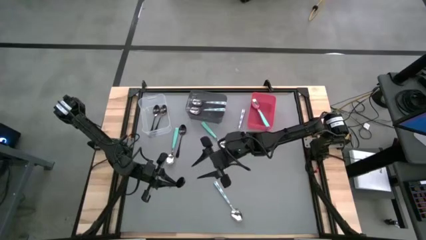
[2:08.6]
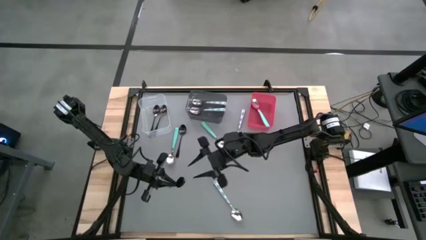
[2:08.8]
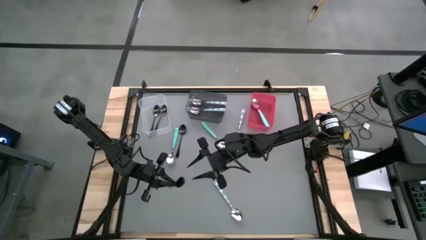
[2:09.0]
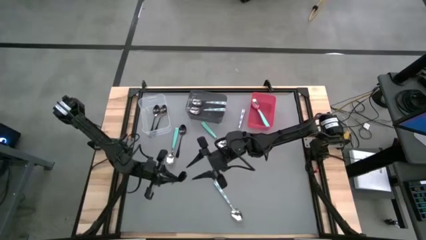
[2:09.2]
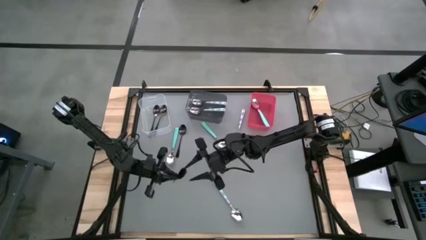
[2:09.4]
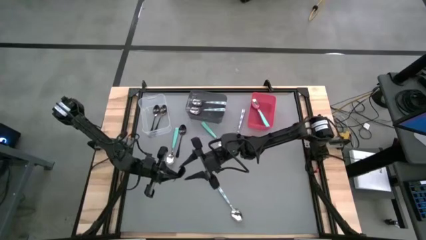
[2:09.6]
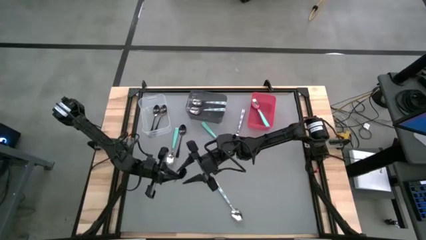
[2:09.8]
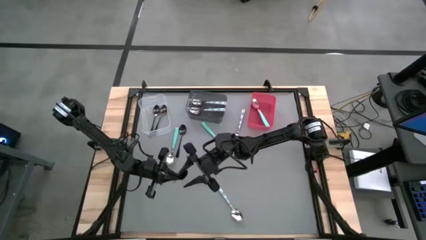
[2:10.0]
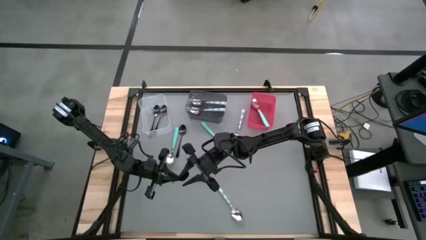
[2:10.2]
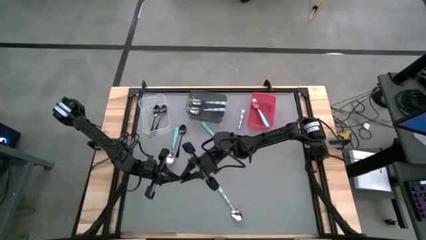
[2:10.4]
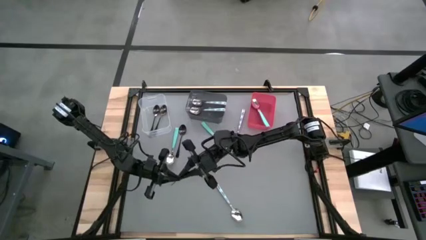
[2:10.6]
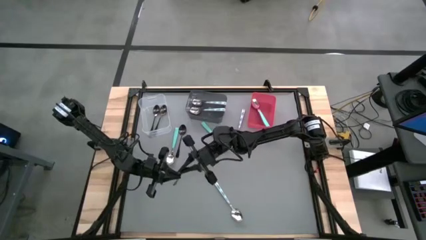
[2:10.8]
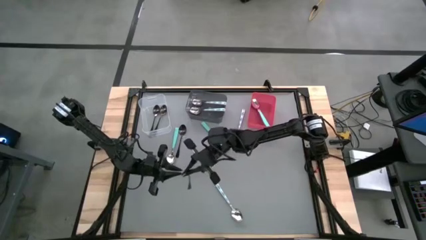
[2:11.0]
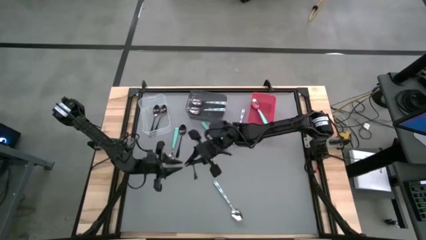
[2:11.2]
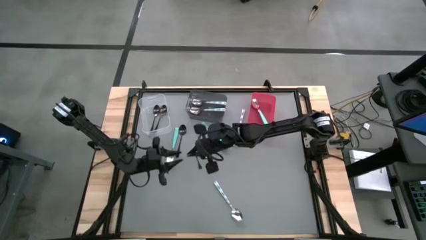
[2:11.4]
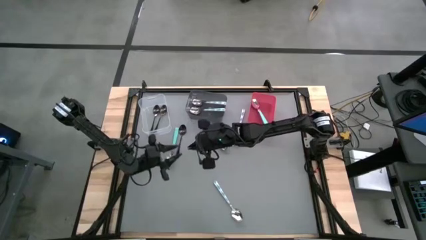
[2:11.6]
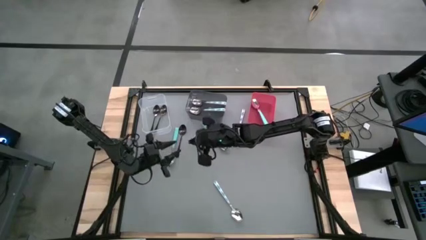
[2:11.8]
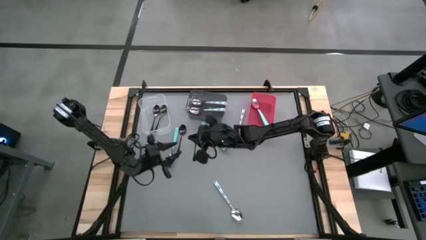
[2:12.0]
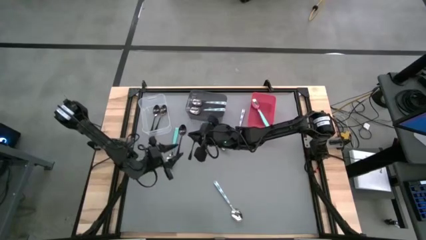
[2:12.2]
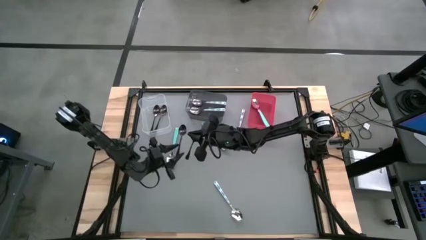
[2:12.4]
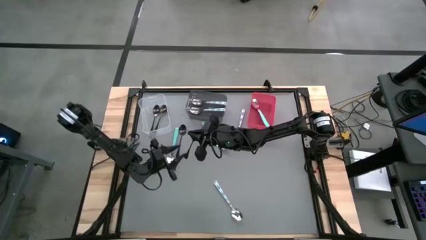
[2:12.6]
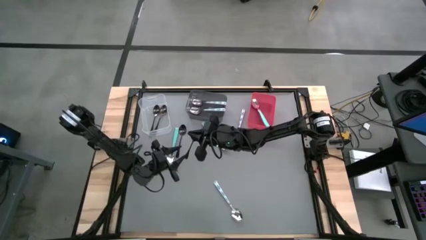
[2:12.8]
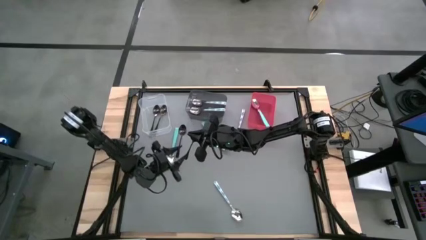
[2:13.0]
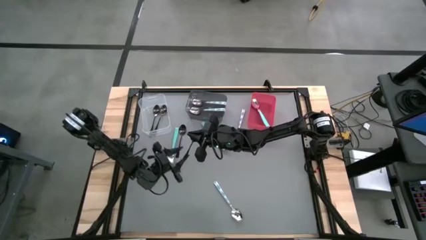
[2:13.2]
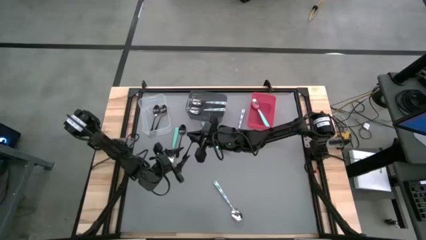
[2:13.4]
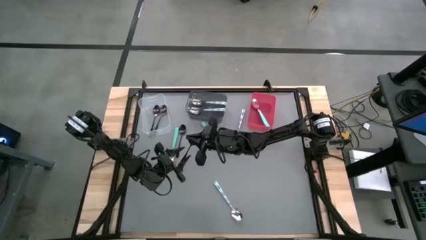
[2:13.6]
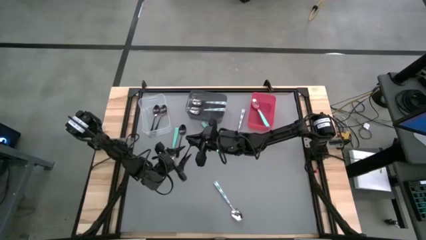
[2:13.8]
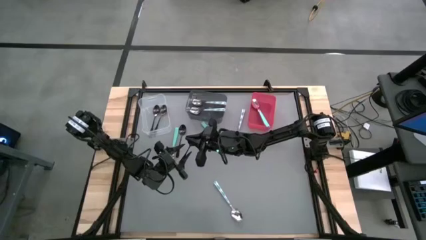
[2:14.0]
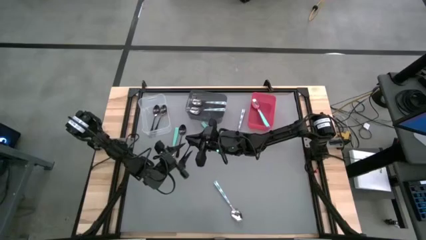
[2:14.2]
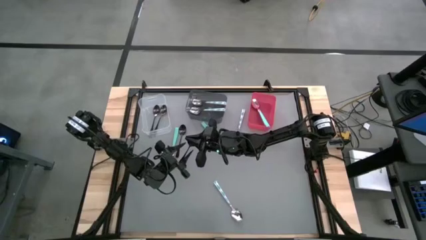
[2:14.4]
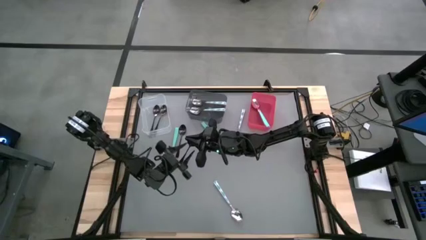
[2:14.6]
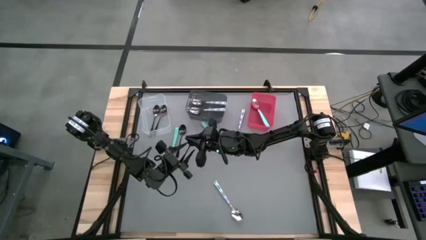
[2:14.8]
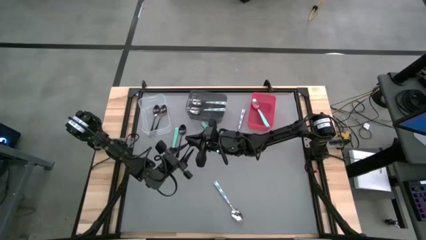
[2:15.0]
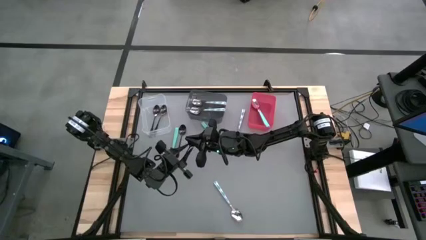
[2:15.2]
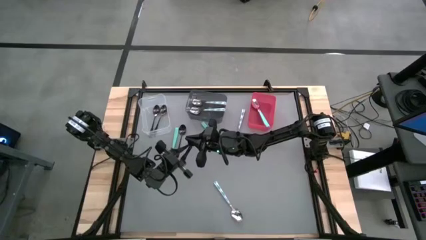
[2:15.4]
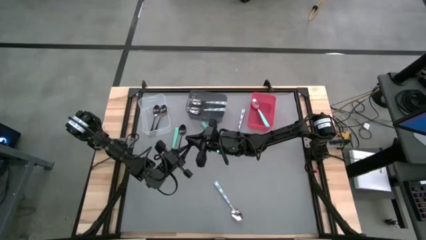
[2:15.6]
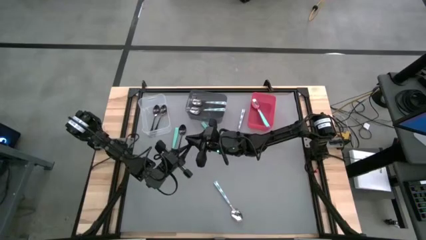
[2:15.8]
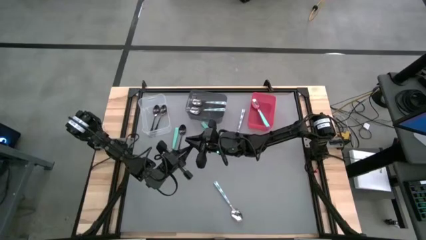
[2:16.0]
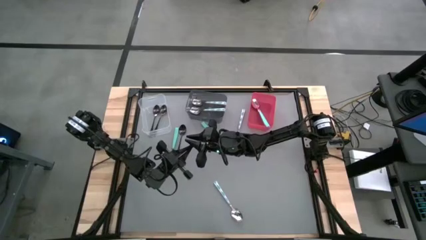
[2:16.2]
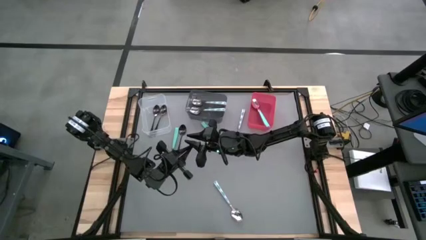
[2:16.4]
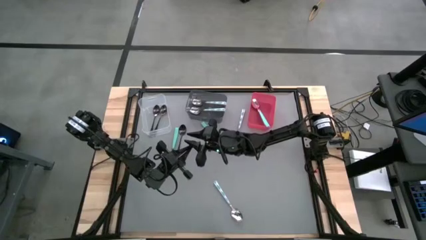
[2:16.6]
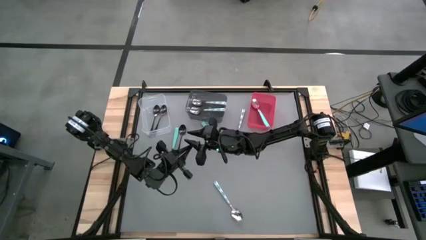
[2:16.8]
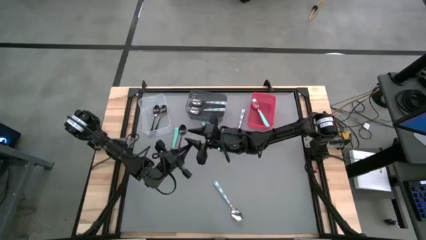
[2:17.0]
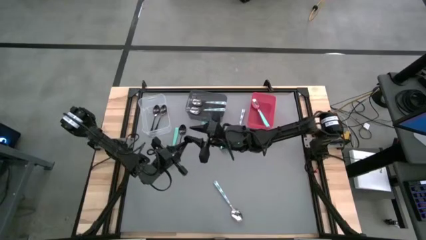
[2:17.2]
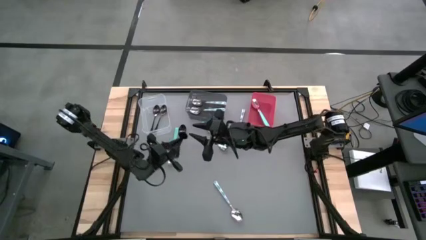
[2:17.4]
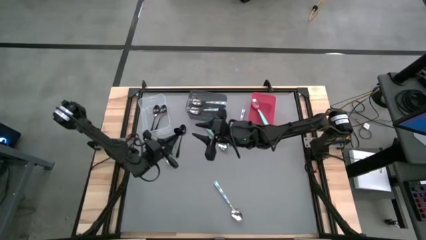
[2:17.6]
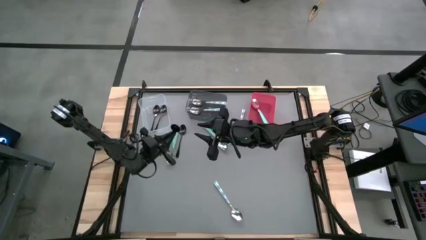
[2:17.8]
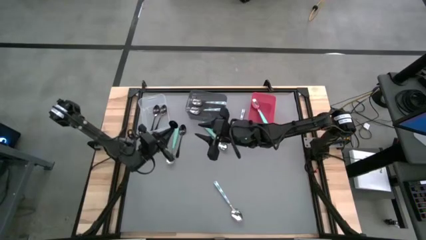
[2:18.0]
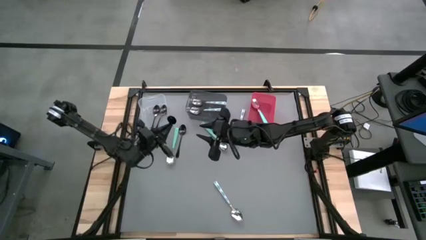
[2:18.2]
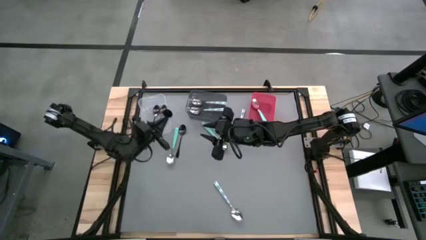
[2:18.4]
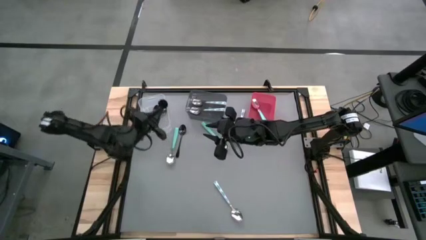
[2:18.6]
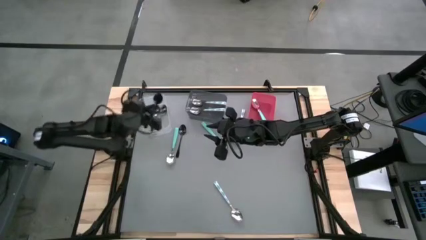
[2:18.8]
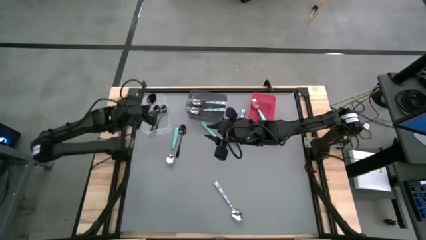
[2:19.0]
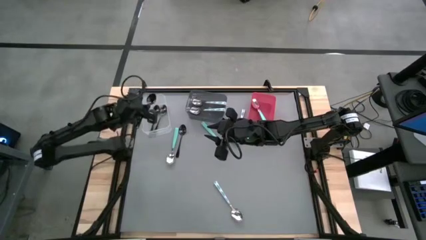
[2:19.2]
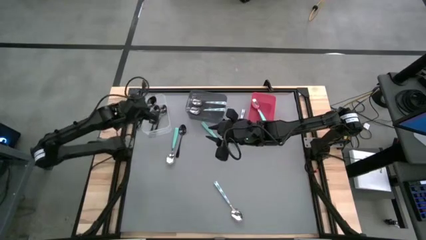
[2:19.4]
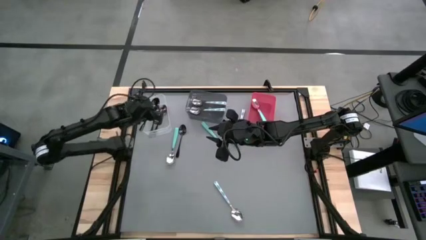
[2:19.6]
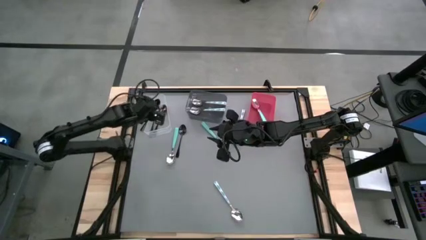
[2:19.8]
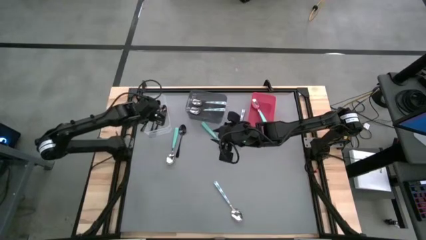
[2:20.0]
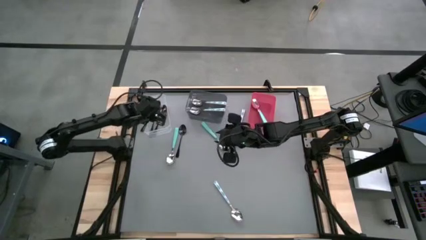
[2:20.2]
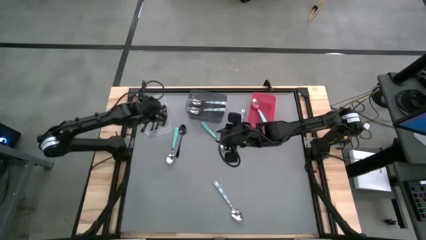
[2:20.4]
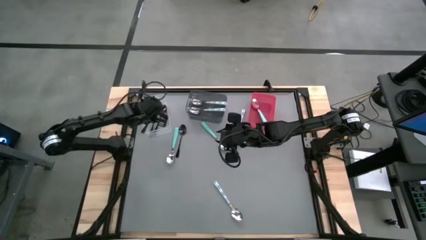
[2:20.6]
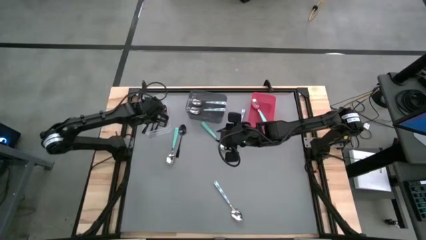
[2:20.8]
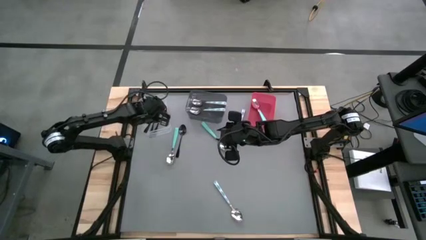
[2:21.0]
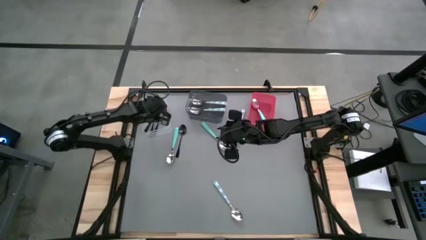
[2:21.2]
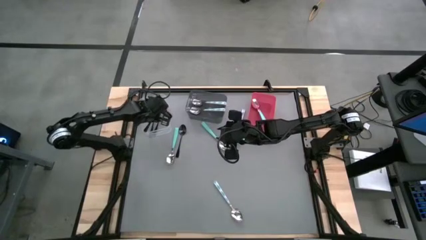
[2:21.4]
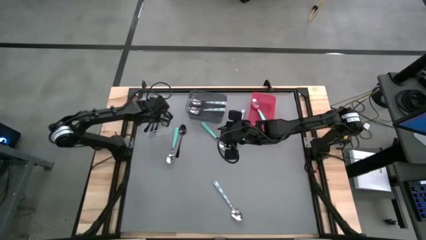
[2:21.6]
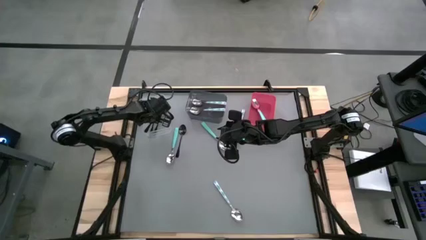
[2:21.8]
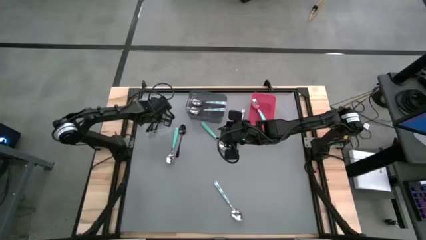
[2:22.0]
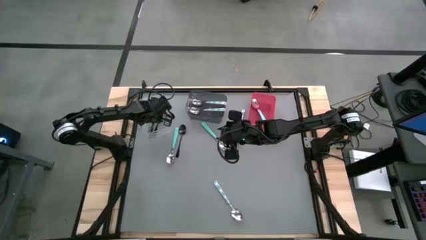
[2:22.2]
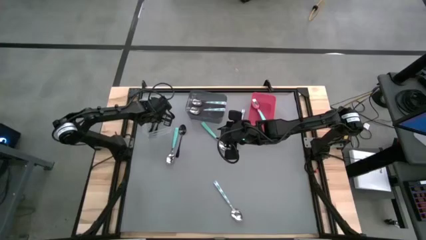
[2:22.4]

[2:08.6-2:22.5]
Task: Sort silverware by color (type)
Put the bottom black spoon into the transparent bin

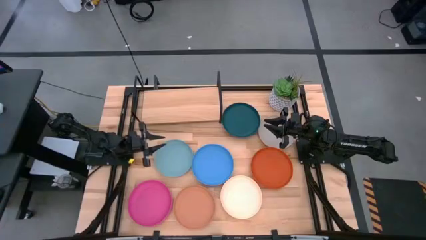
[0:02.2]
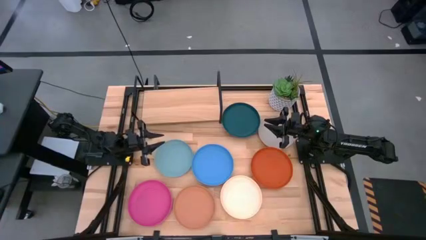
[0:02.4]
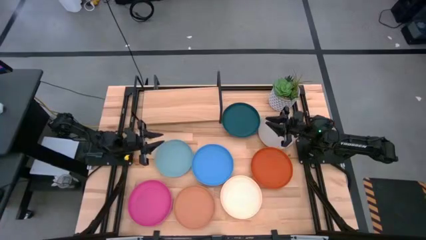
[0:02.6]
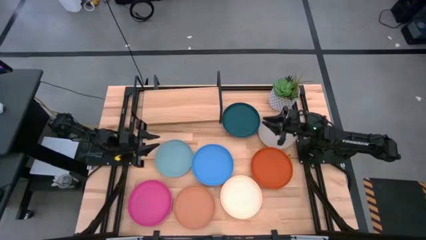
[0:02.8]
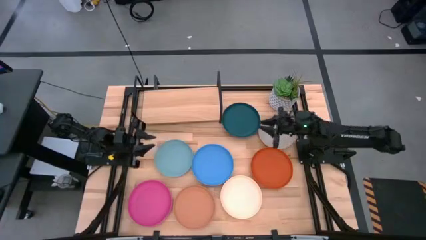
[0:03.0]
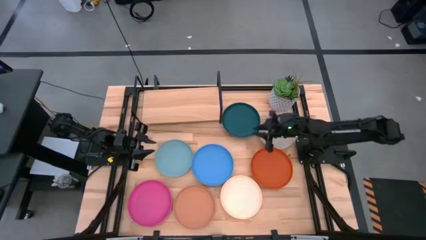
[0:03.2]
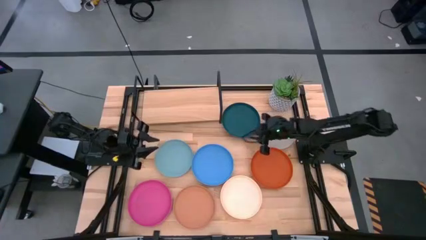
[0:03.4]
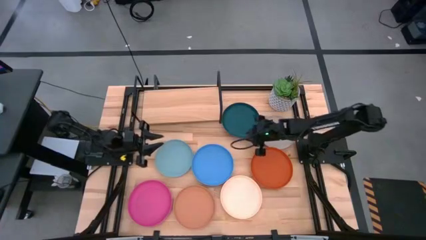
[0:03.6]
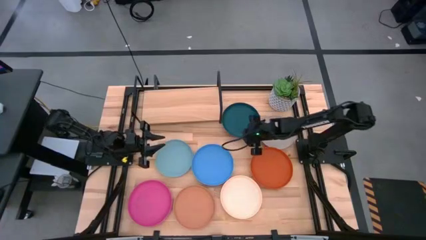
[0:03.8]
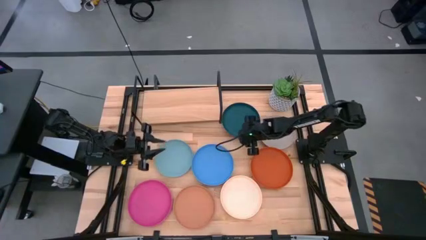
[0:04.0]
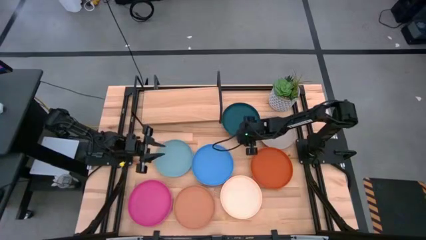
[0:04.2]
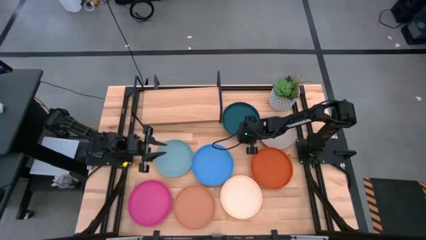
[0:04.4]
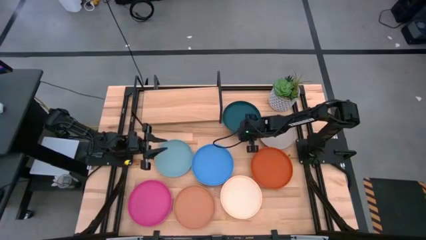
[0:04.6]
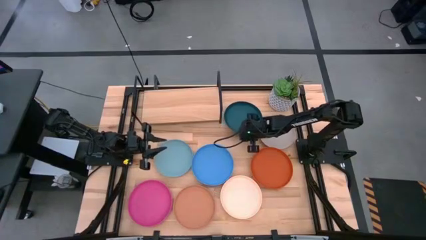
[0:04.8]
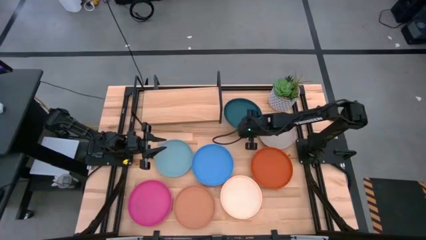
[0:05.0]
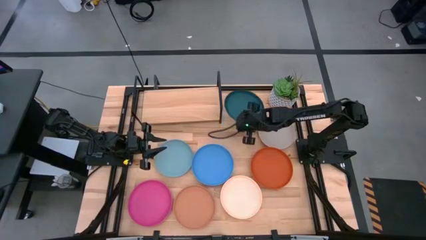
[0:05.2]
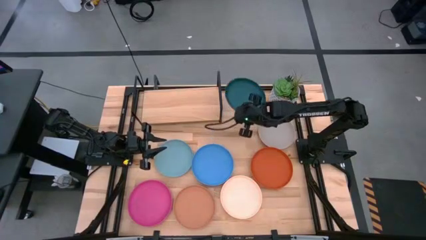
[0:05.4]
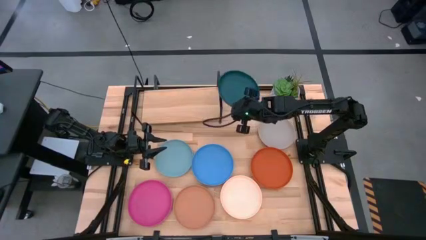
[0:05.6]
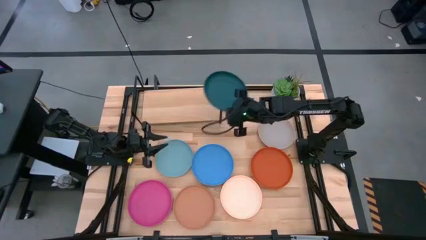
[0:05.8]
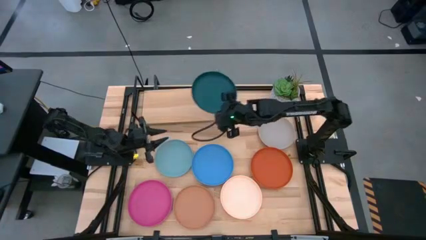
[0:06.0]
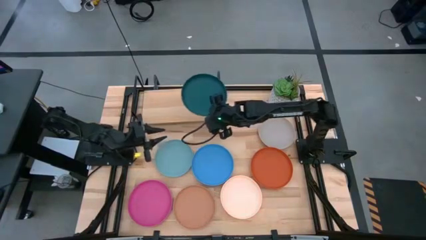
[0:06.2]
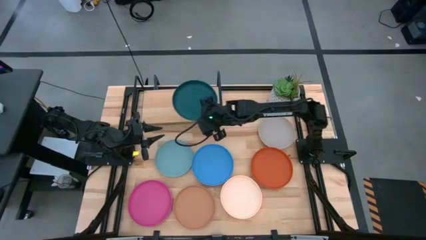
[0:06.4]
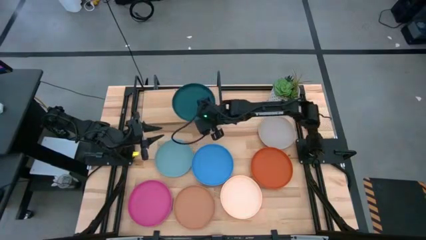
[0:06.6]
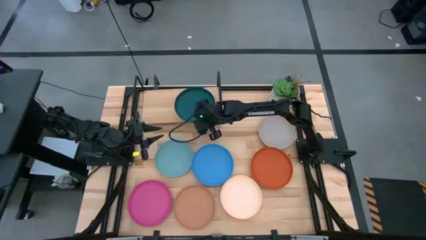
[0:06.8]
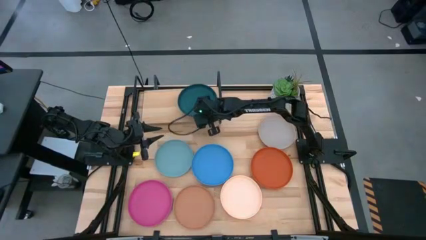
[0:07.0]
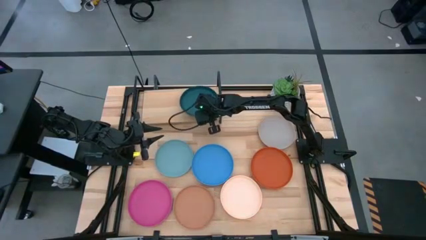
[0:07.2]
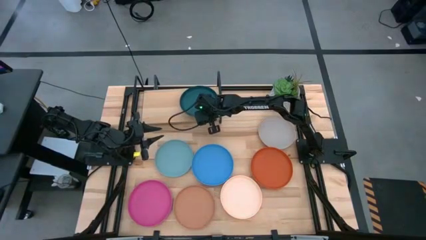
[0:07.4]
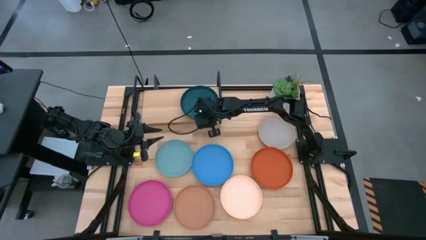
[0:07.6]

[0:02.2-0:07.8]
Task: Place and stack plates onto a shelf
Put the dark blue green plate on the shelf
